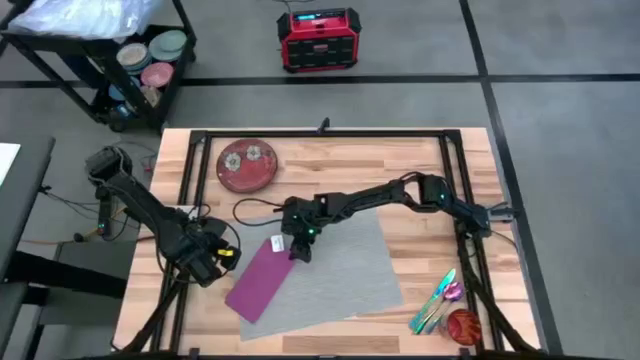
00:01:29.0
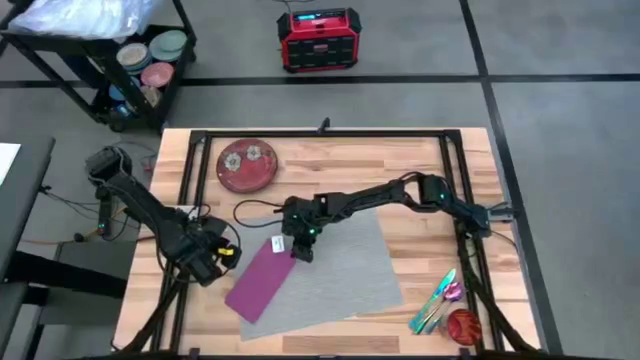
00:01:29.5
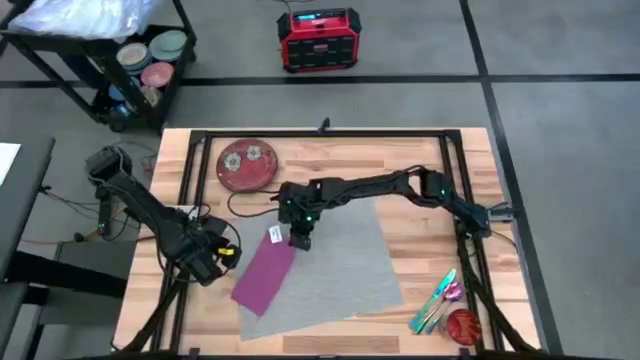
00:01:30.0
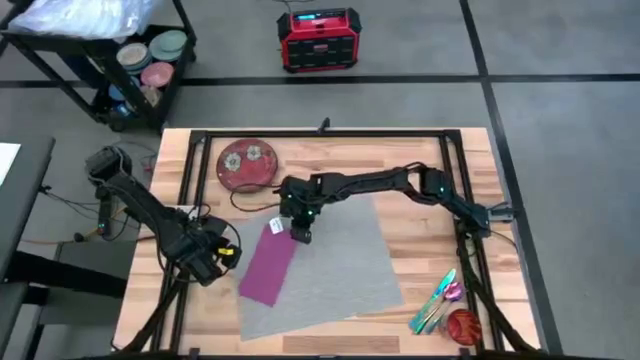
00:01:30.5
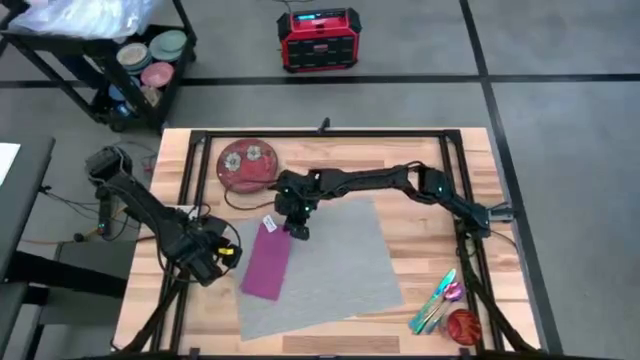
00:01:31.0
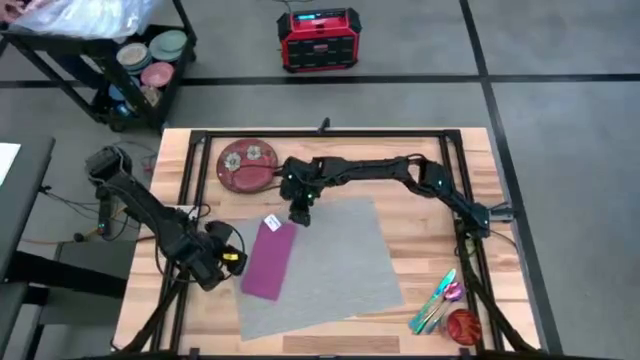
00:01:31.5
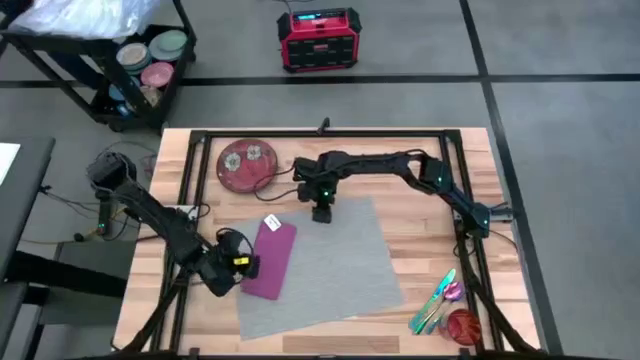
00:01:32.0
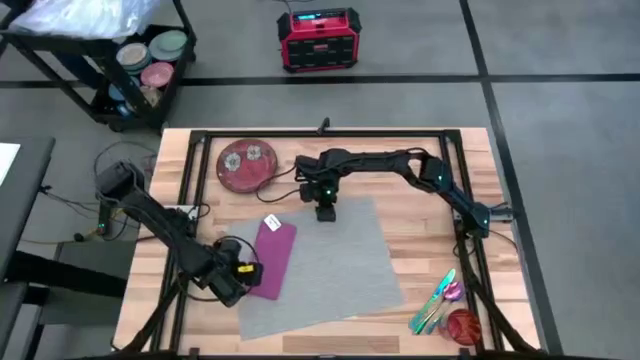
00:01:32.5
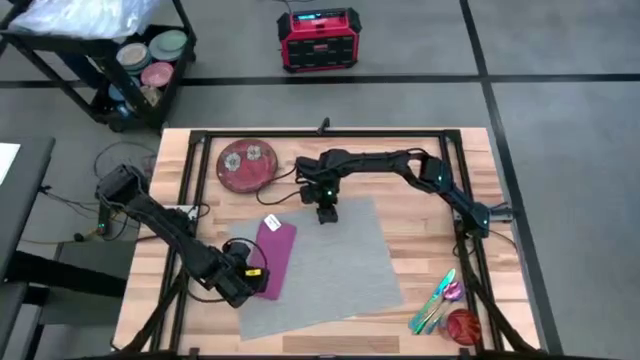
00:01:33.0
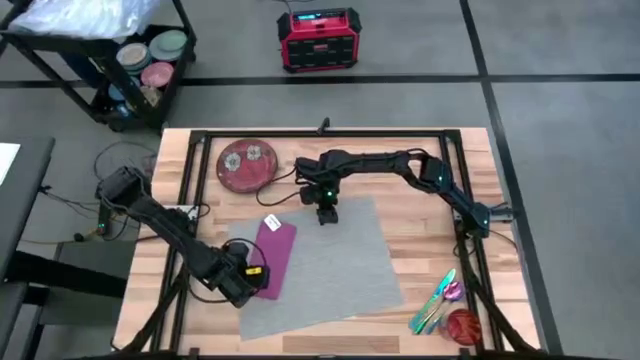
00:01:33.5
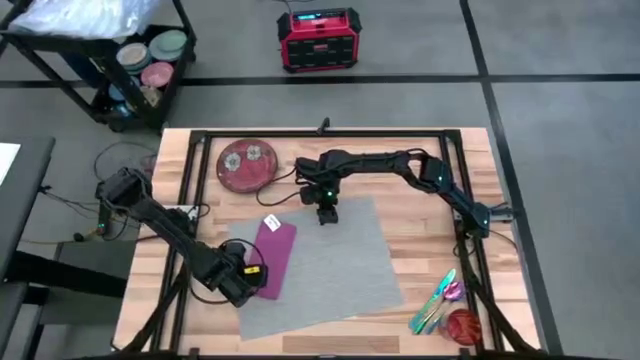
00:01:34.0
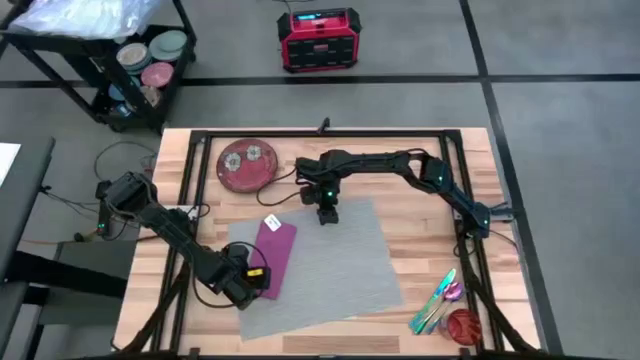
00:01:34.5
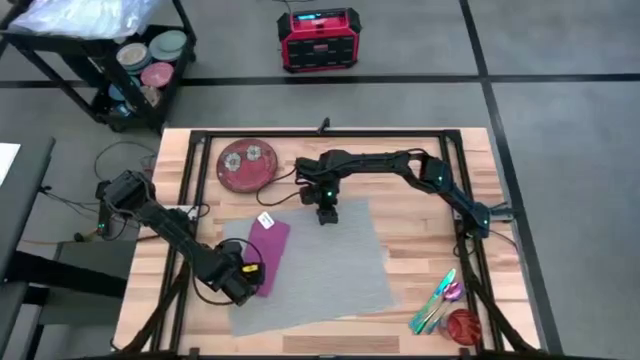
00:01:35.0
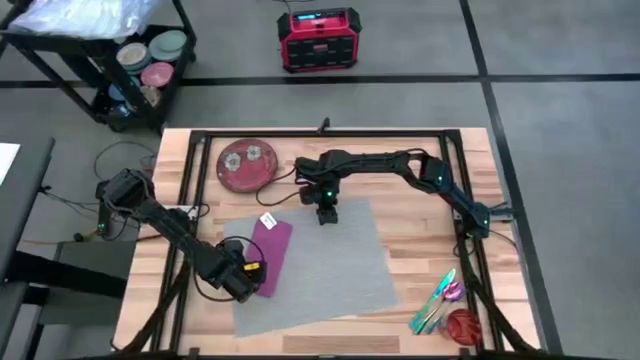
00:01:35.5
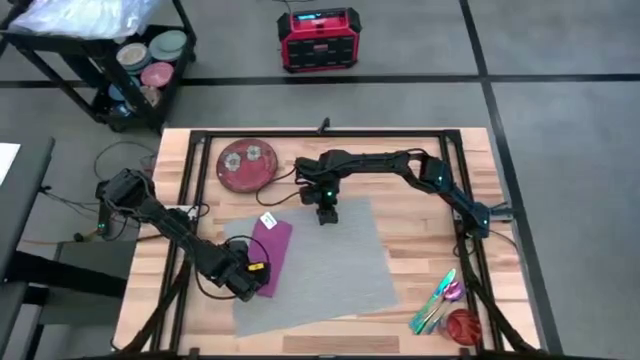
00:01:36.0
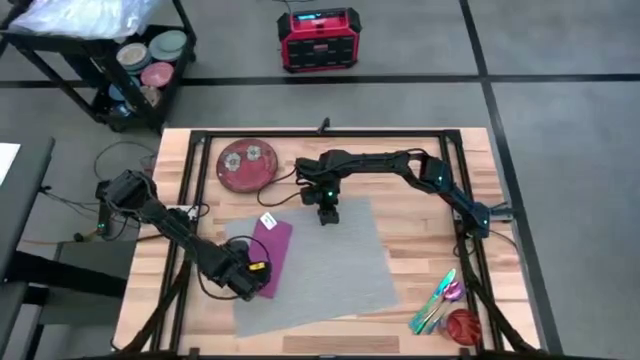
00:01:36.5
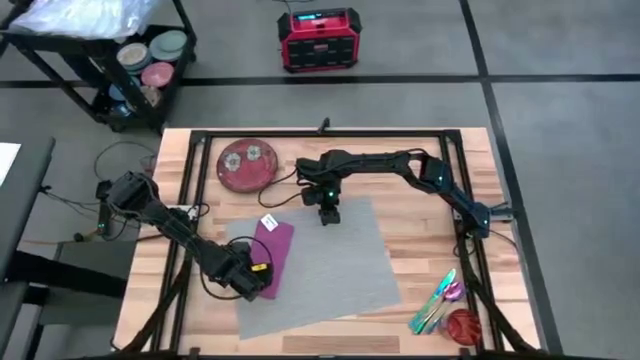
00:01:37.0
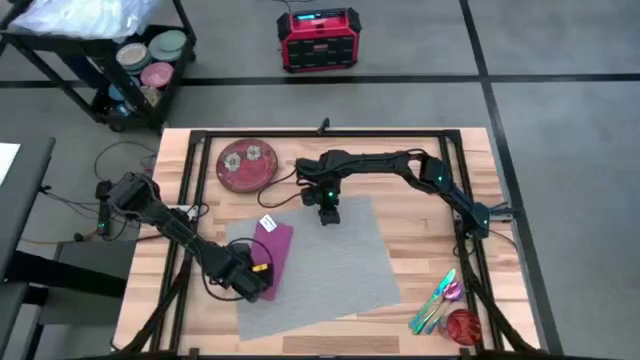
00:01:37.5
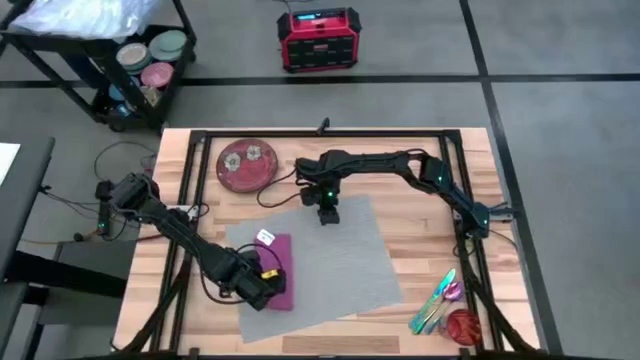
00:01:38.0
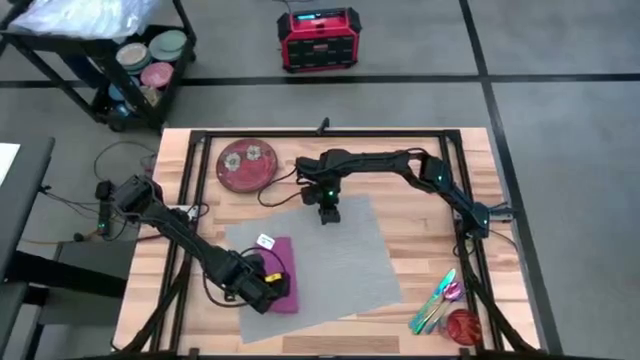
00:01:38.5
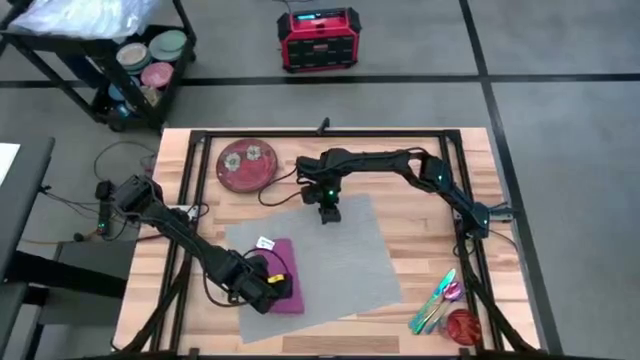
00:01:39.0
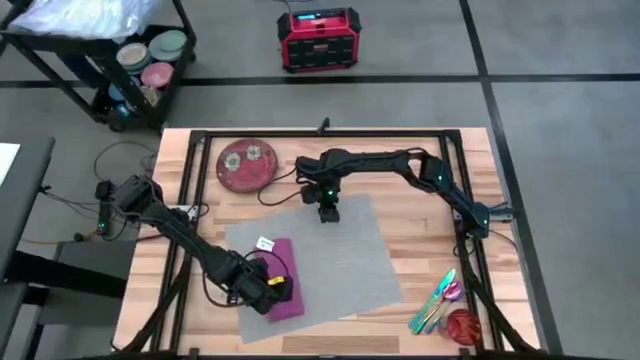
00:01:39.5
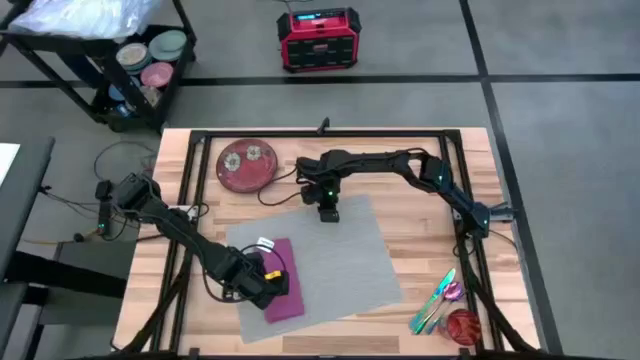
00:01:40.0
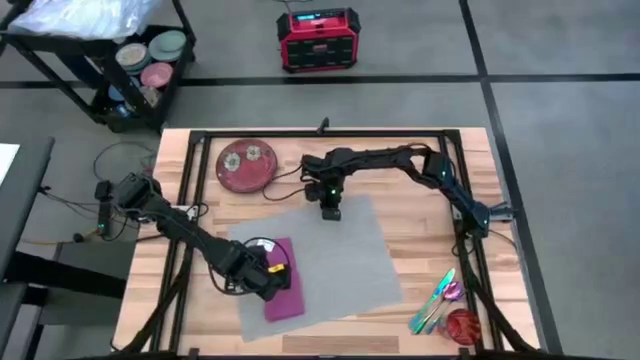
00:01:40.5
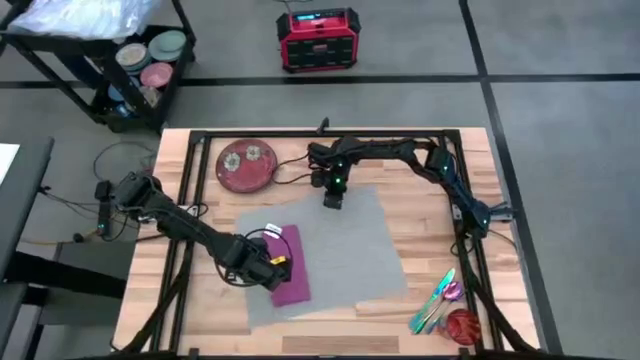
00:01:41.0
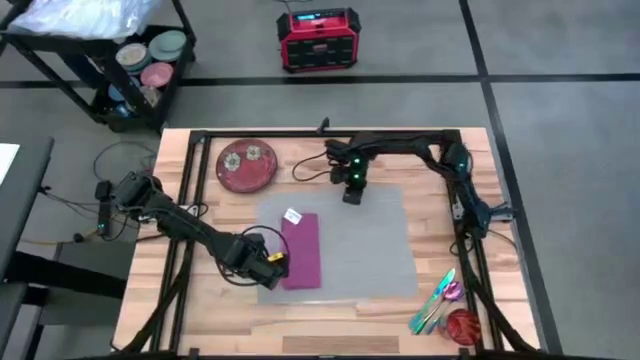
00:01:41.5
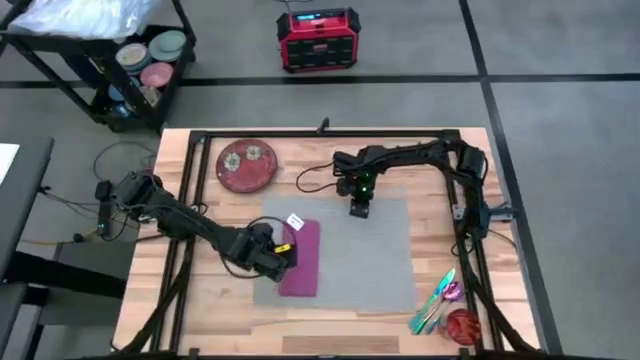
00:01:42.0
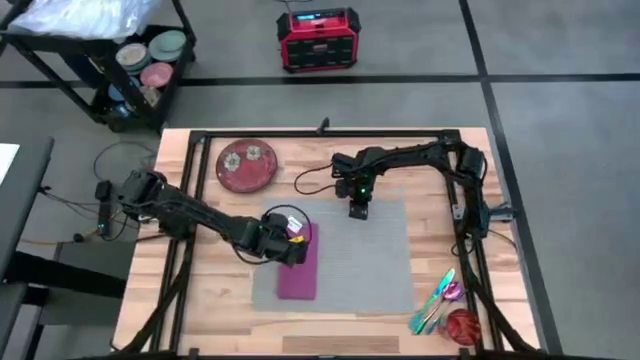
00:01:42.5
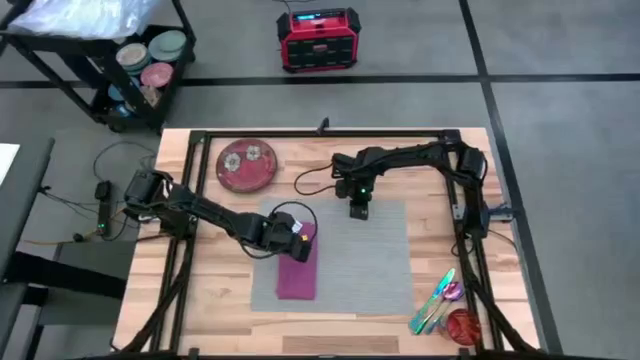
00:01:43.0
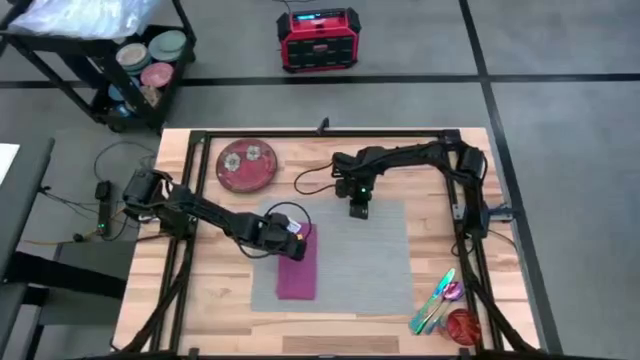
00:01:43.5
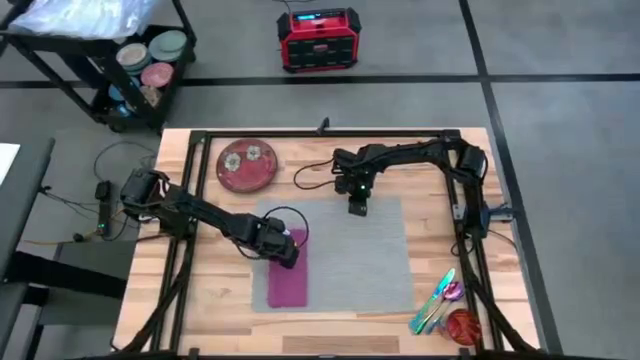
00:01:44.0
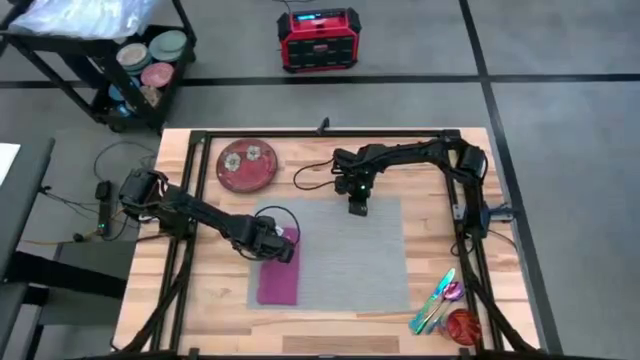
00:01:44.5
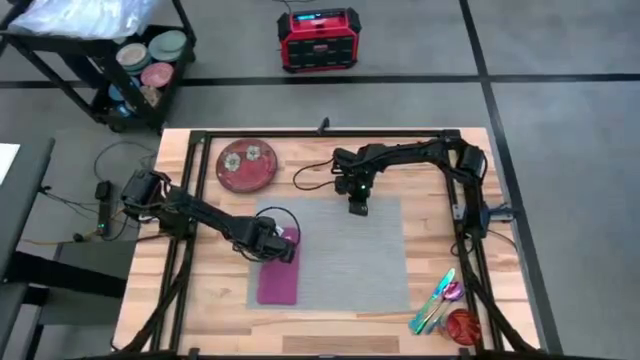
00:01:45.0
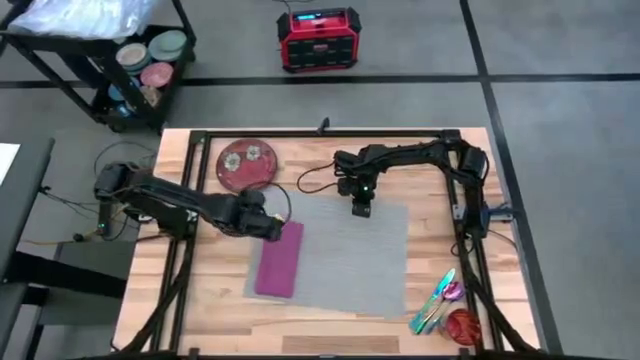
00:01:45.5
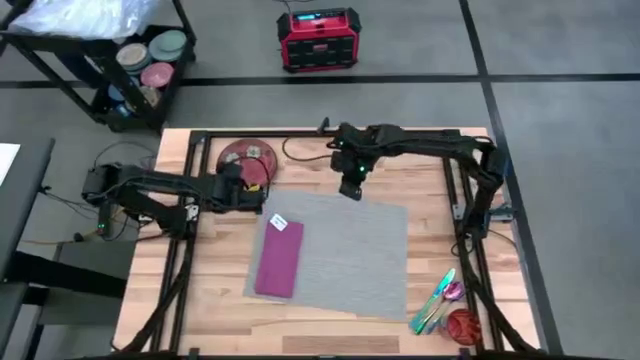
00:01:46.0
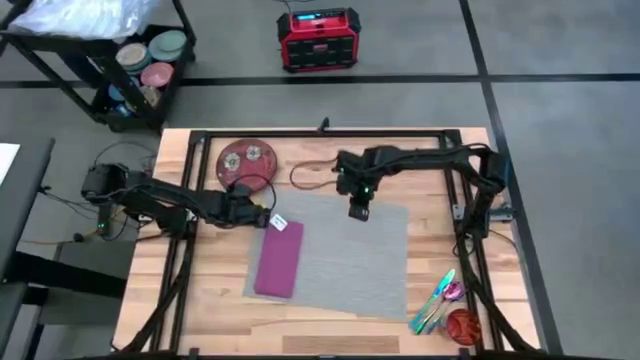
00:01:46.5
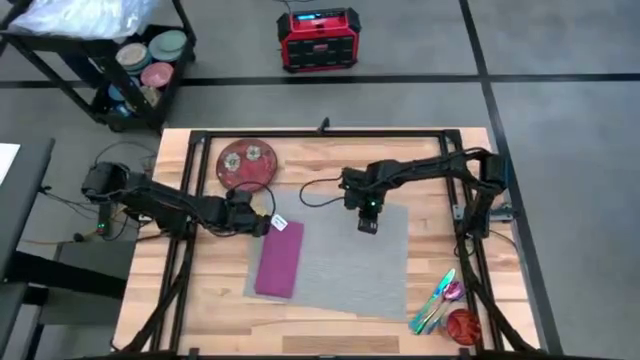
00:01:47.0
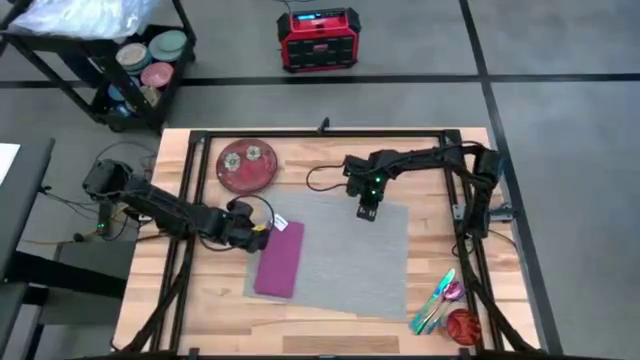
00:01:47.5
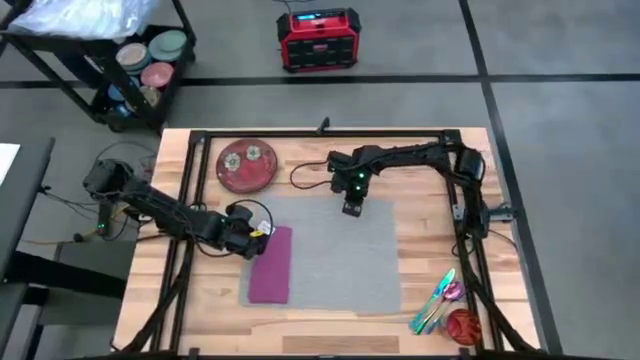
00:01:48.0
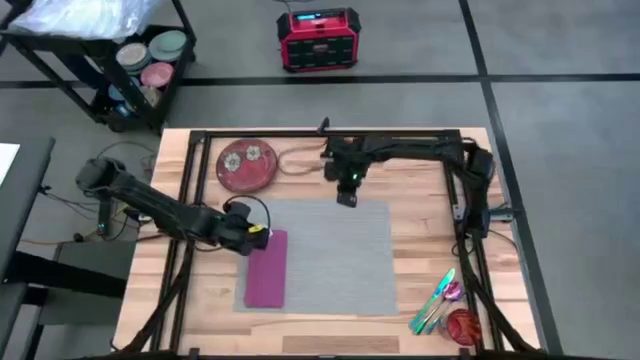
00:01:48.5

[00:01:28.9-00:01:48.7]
Task: Set table place
Put the pink table napkin on the gray table mat

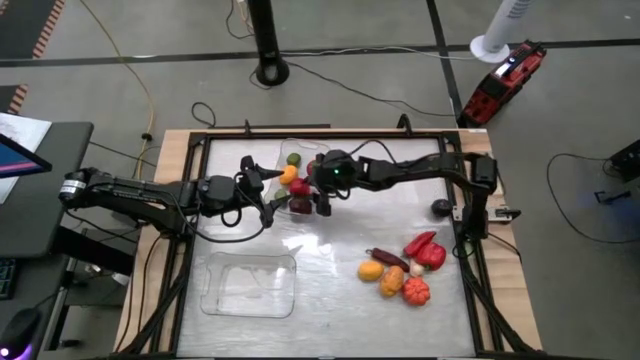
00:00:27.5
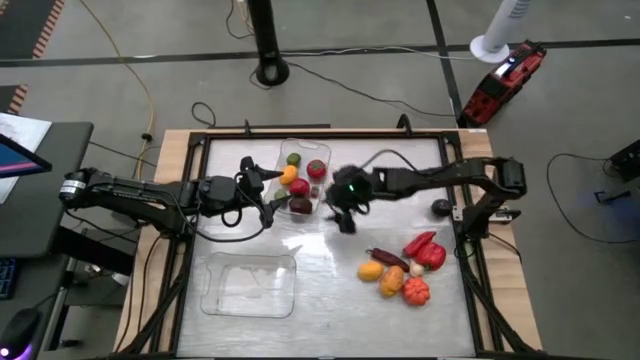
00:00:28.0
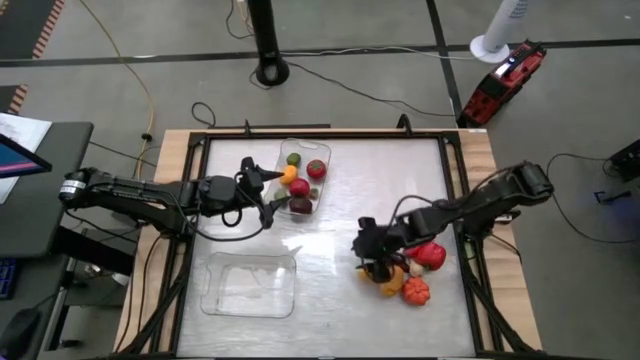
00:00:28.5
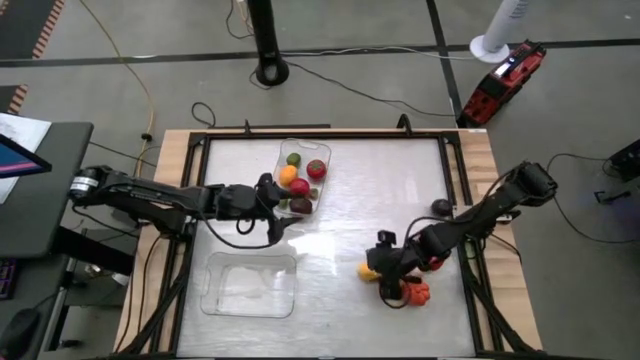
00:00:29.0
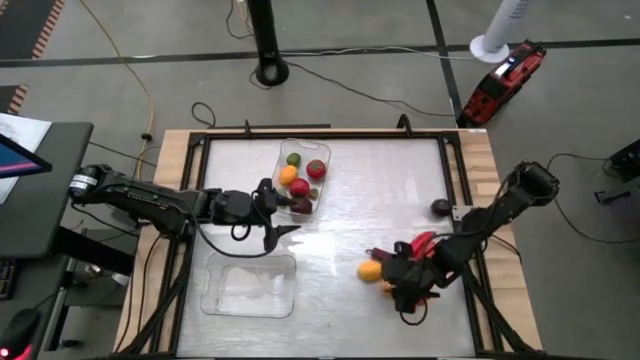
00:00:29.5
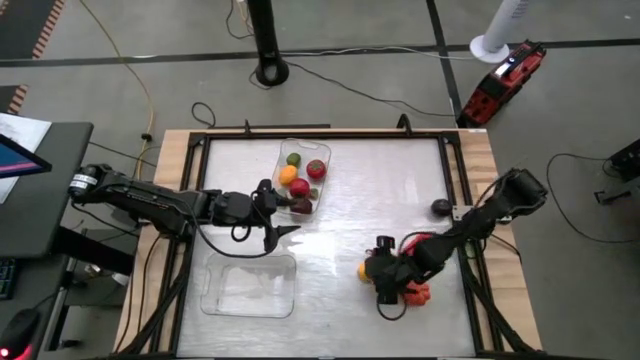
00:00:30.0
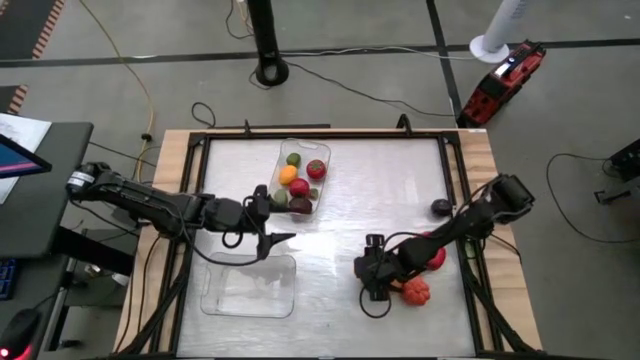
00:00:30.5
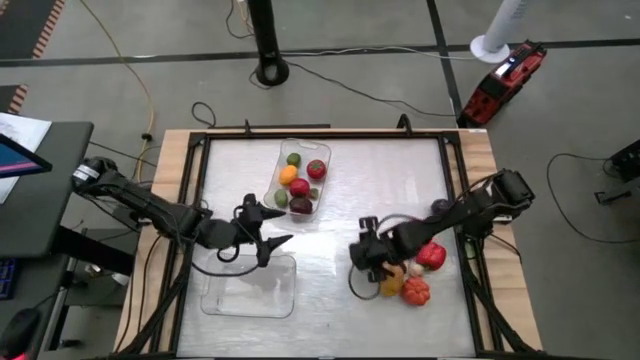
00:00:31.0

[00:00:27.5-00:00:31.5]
Task: Sort produce into baskets
Put the lemon into the top transparent bin
